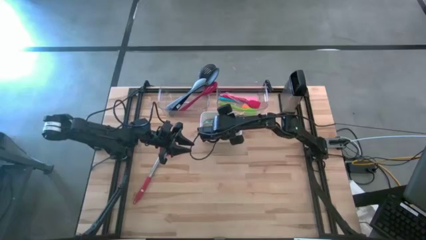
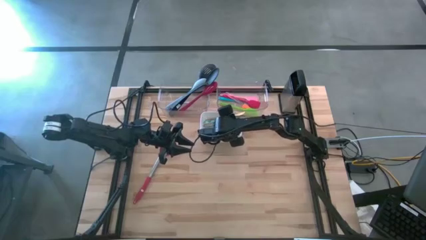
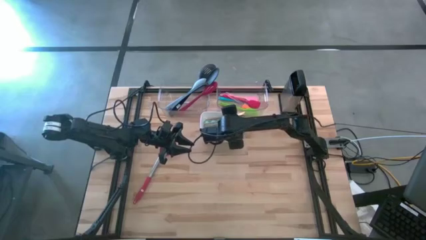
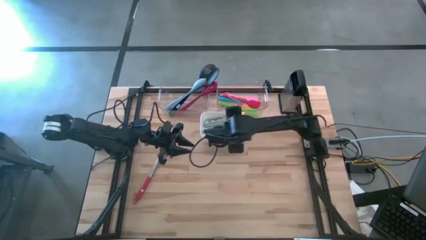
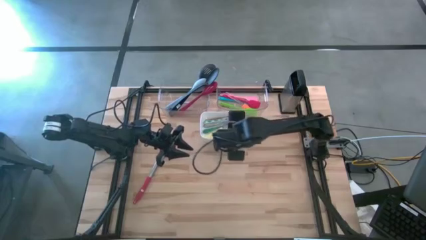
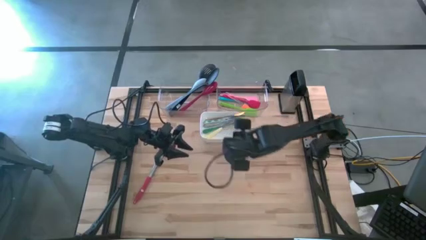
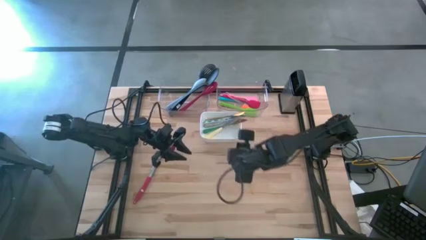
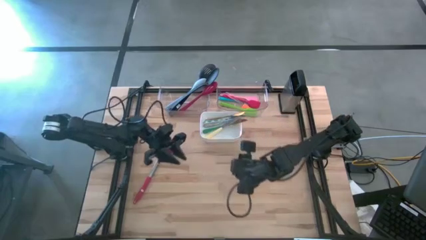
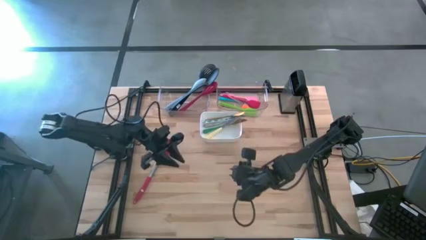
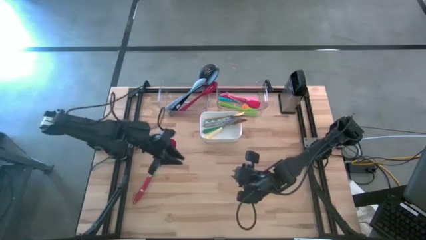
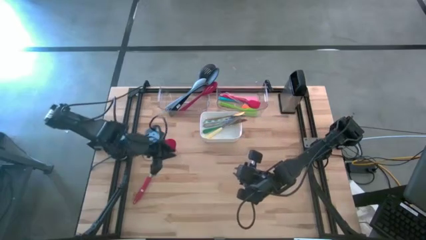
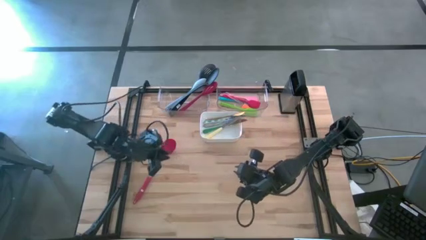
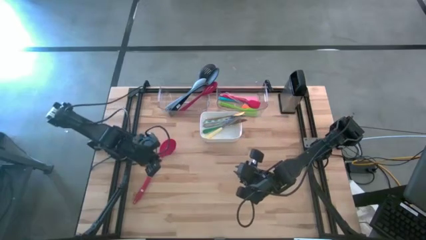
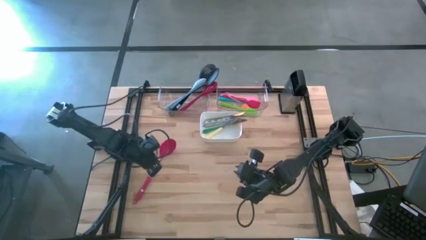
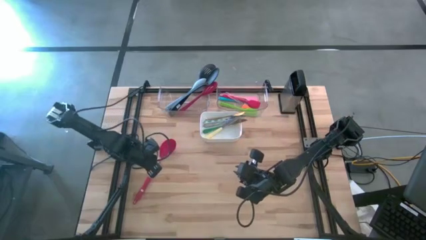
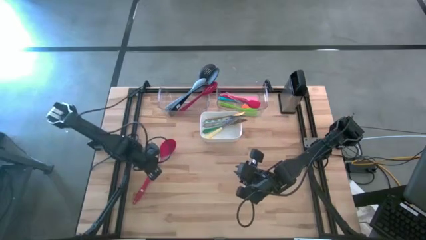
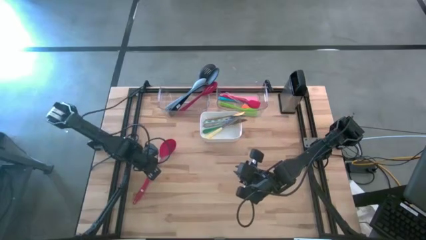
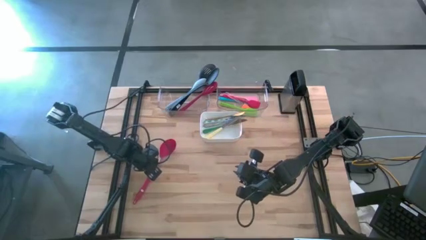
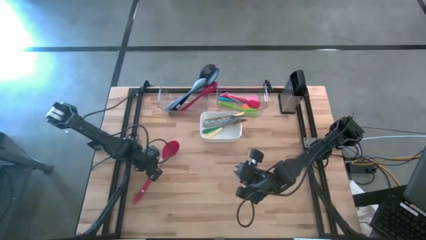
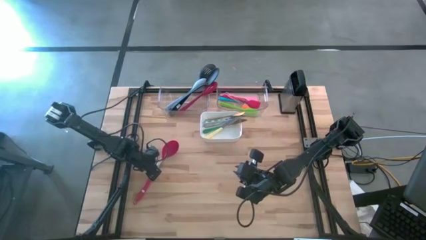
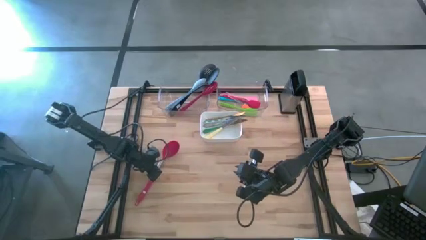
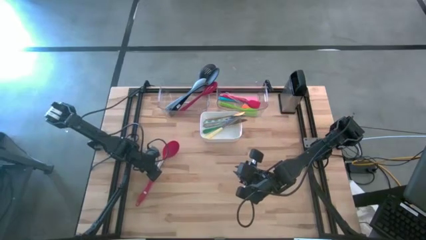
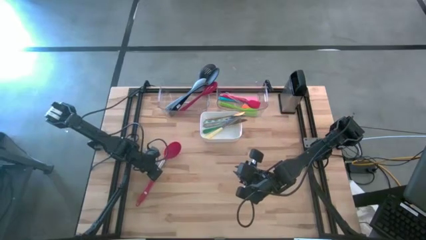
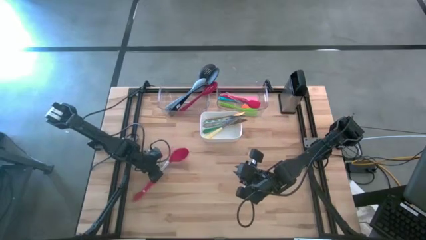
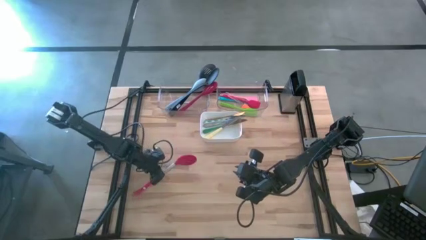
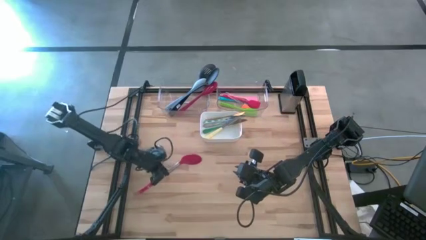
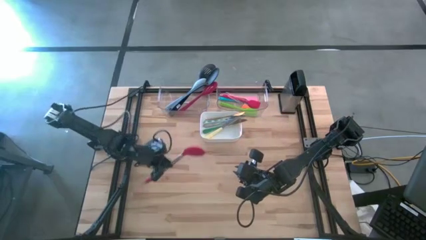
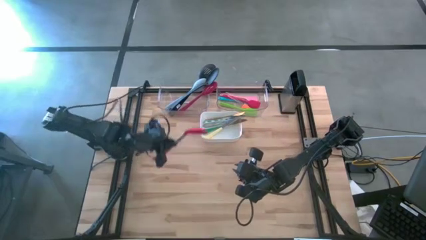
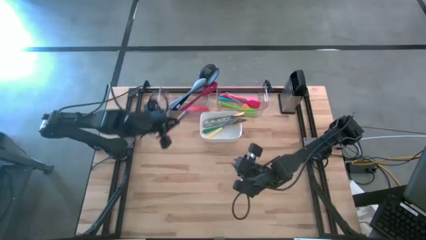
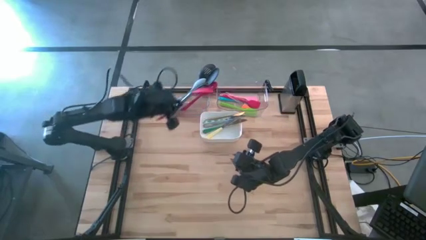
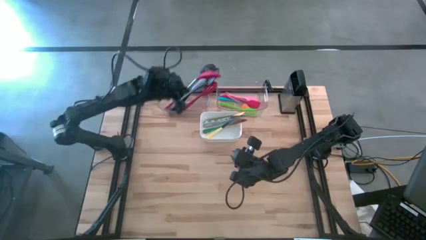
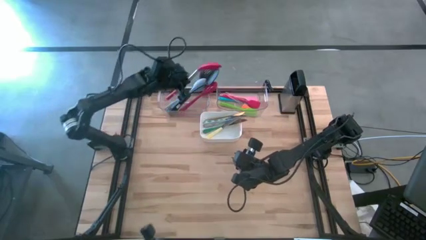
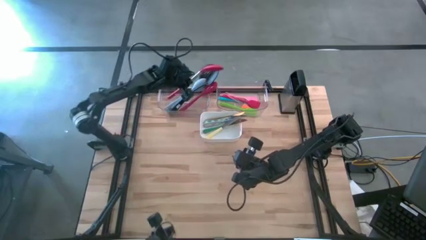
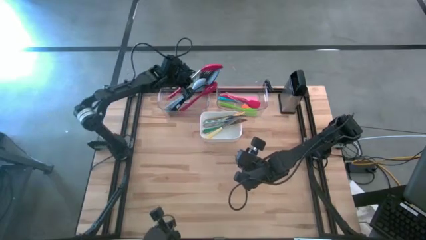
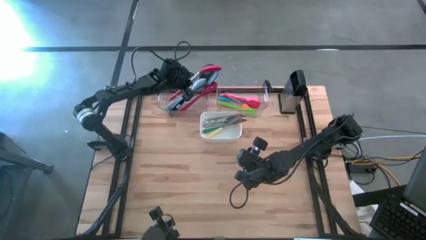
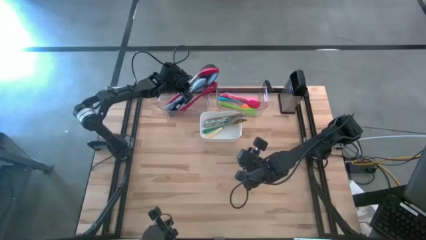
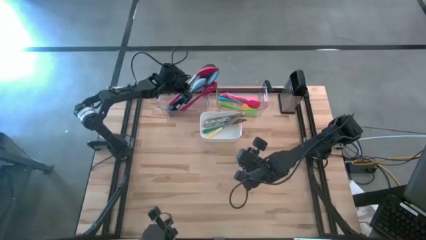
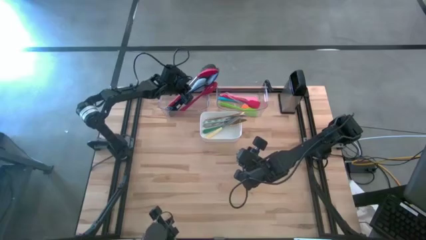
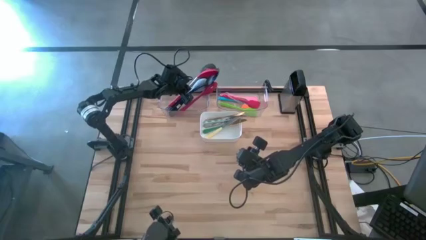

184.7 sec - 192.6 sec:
Task: Pick & Place Kitchen Items
Put the red silver serving spoon into the left transparent bin

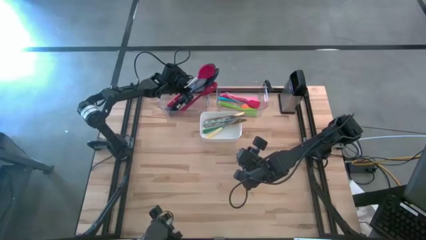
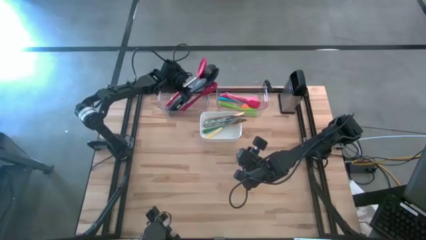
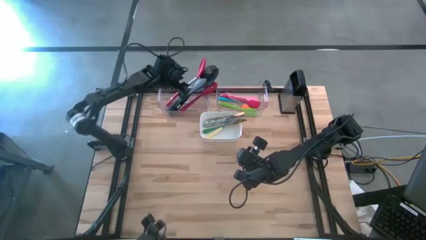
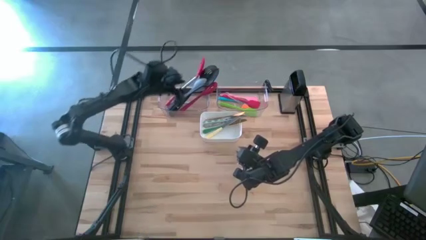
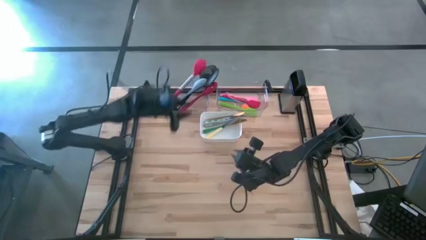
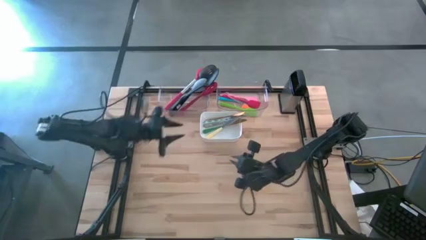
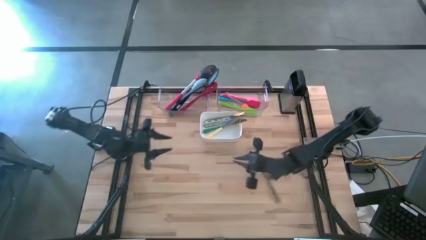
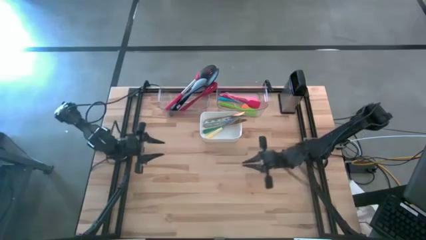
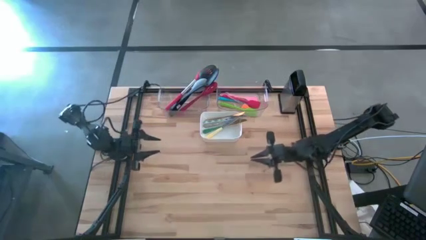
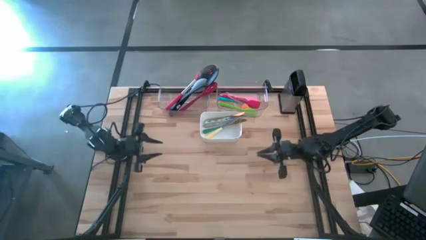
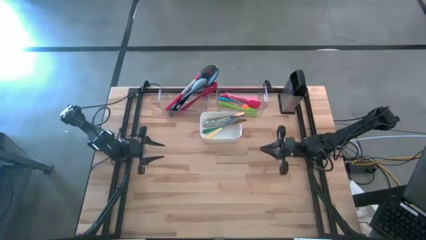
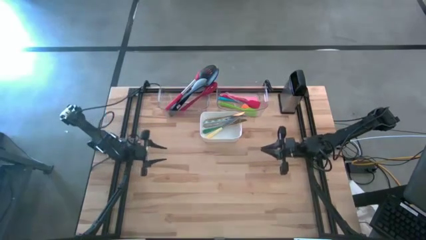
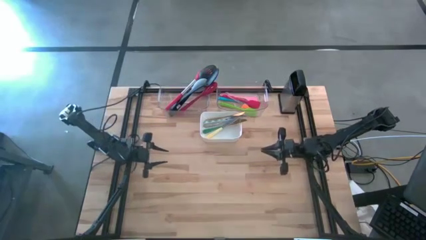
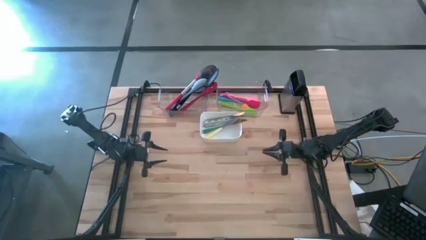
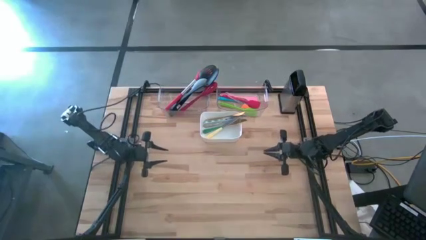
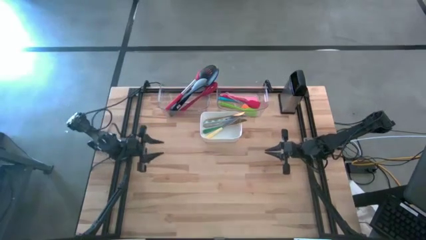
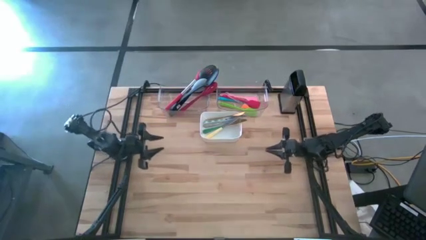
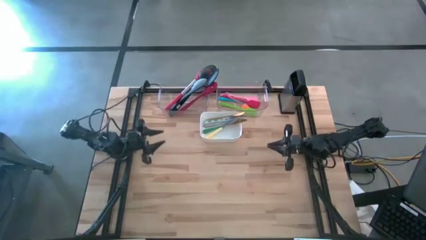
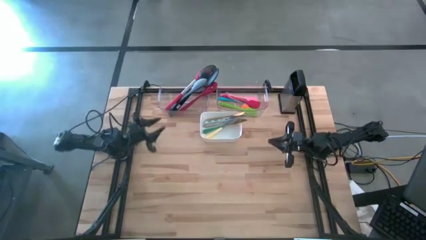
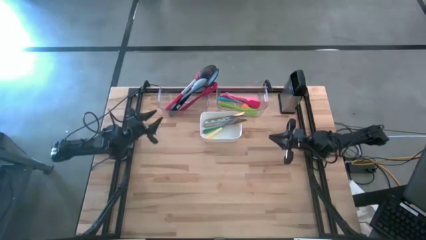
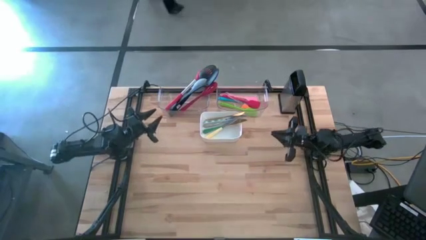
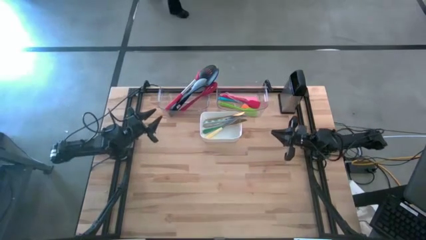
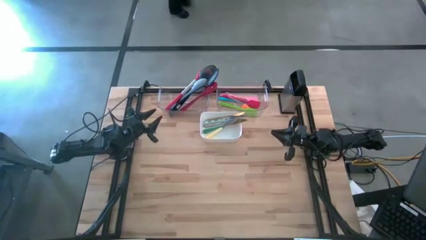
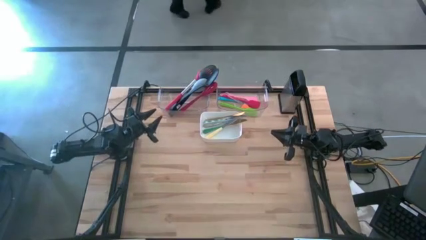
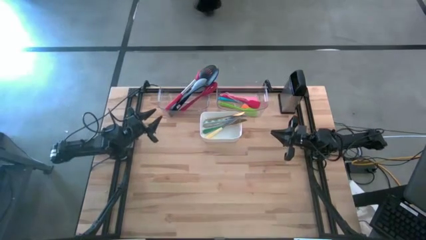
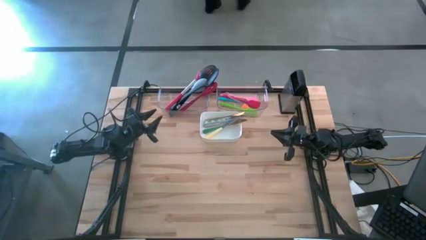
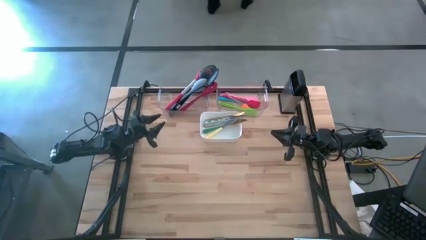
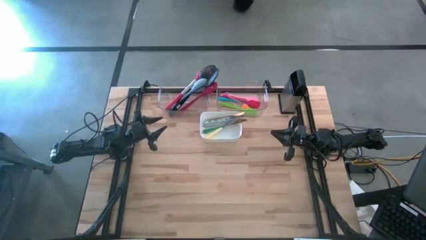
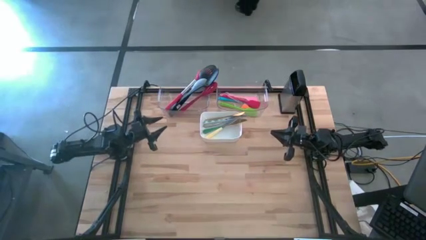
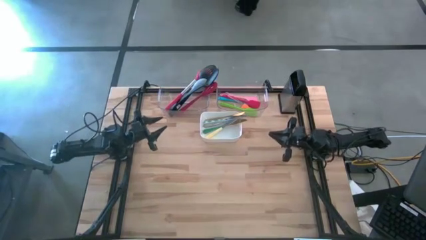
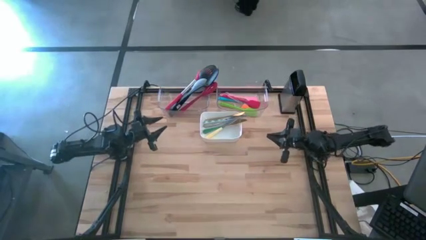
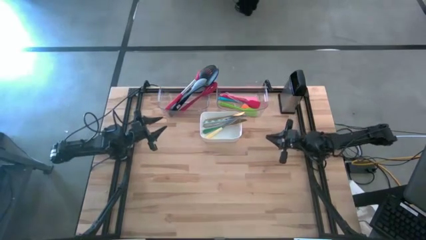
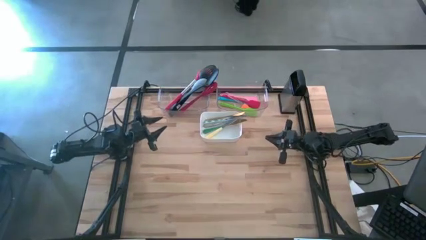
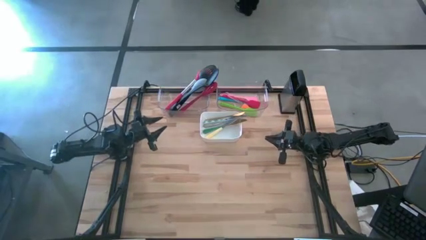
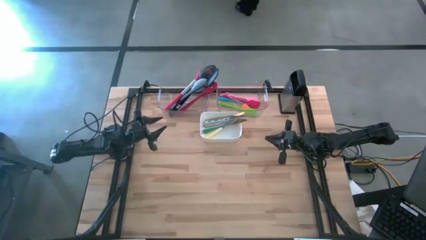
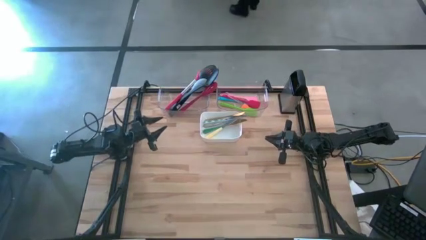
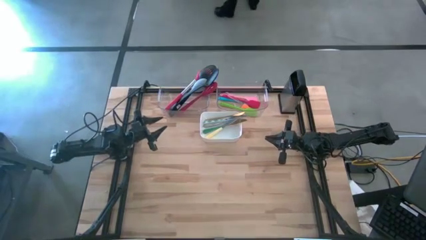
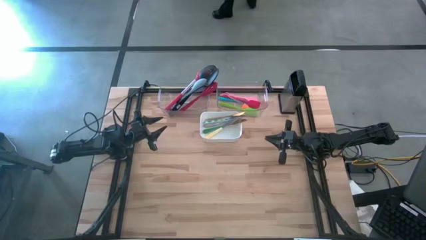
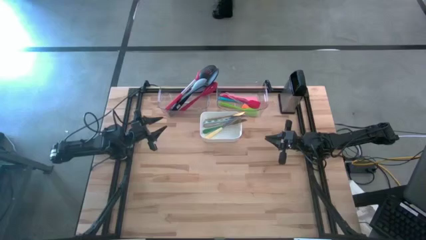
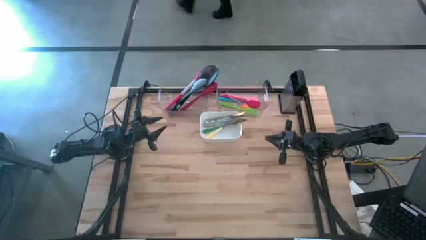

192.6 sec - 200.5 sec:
Return to Home Position

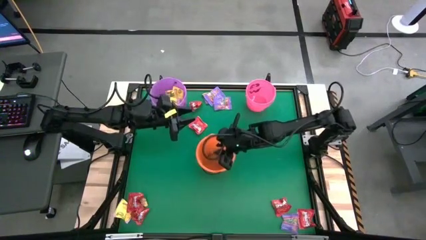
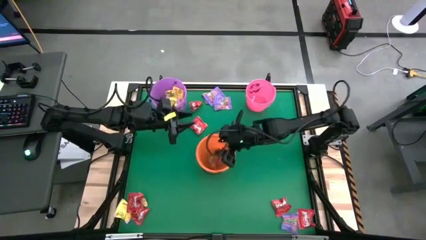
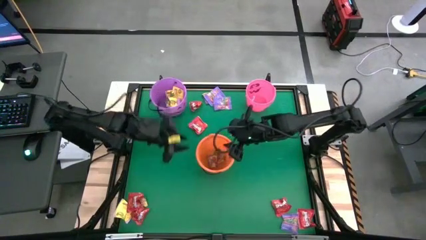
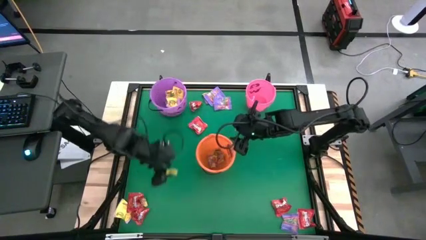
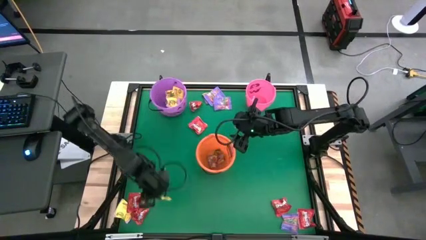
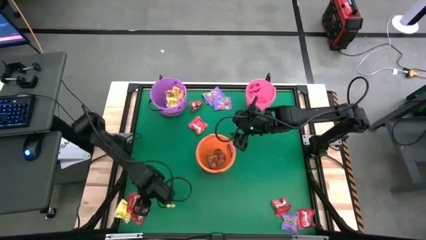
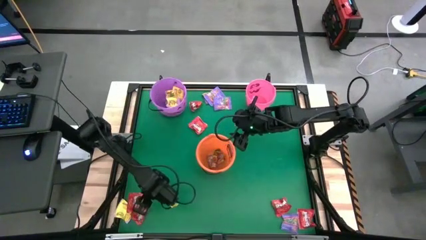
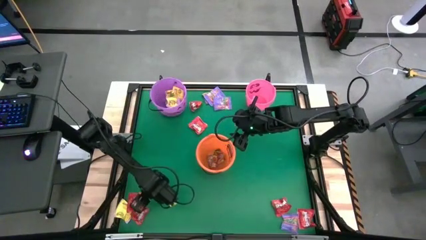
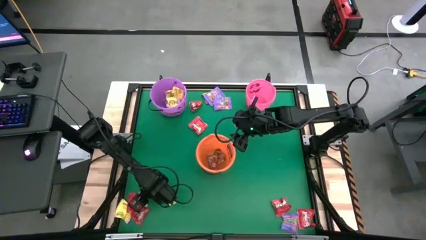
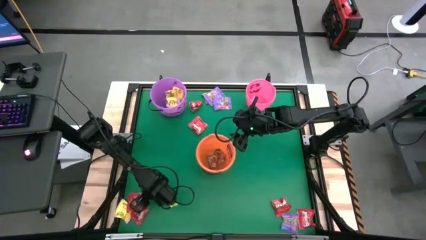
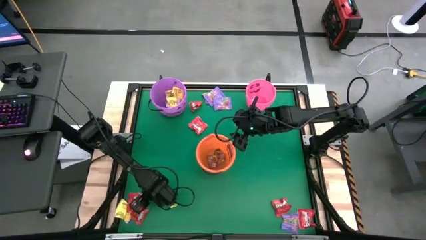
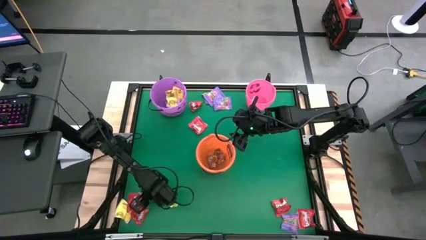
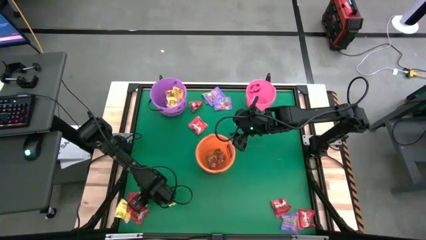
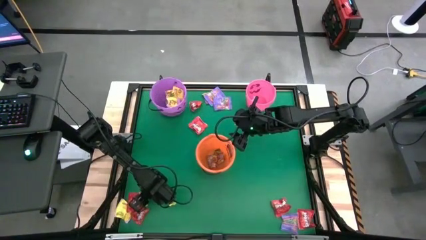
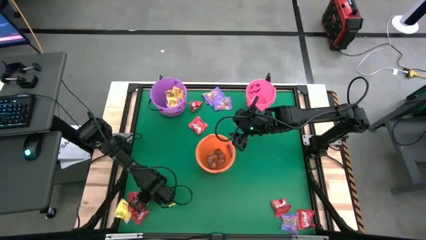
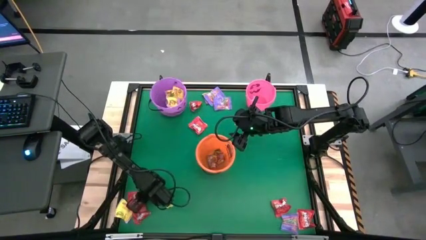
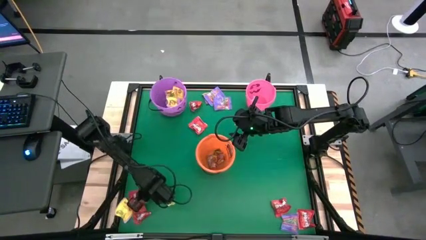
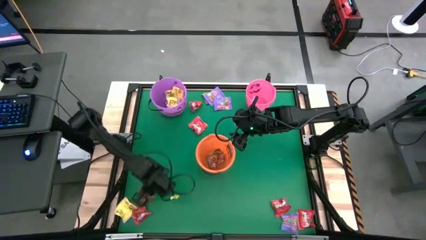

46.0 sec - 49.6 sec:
Task: Sort candy by brand, put in halloween buckets
Put the yellow-red candy into the orange bucket
